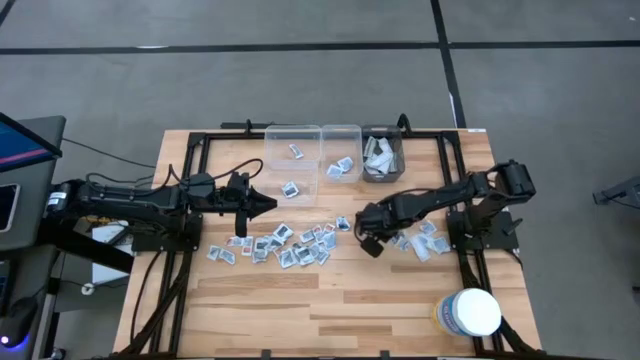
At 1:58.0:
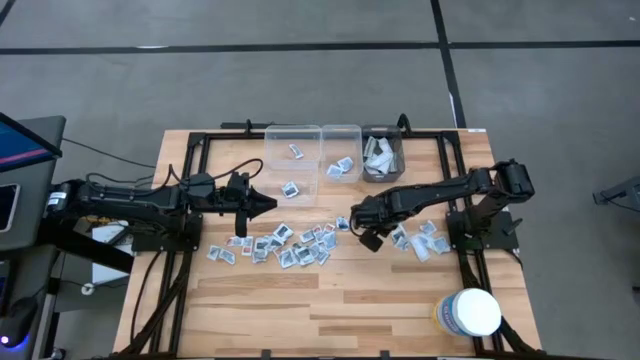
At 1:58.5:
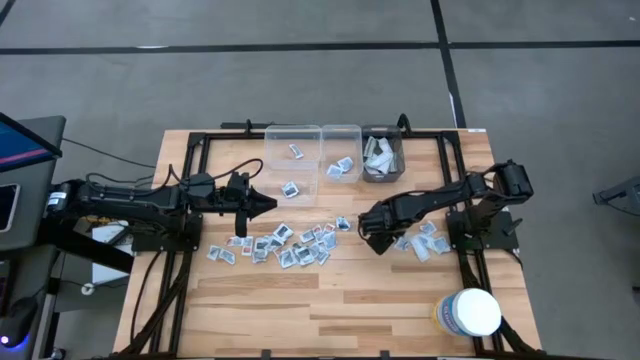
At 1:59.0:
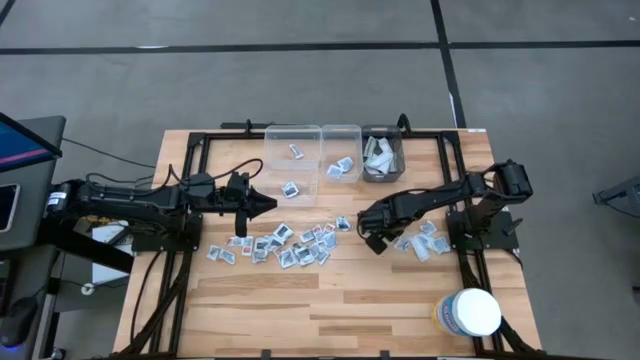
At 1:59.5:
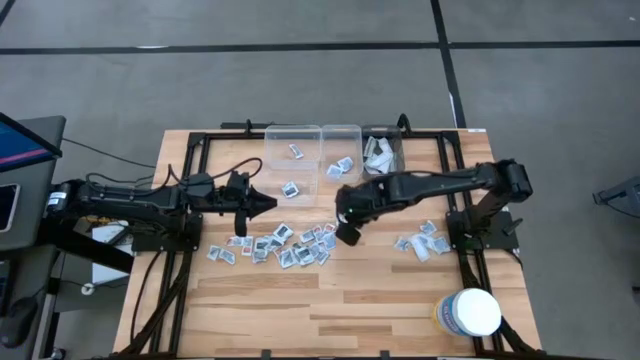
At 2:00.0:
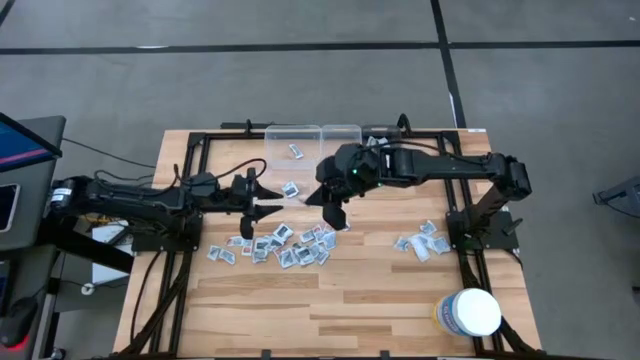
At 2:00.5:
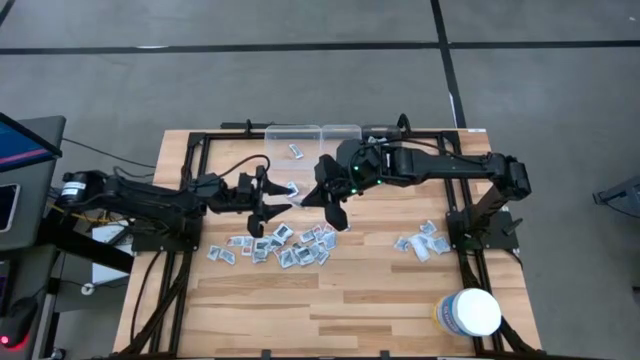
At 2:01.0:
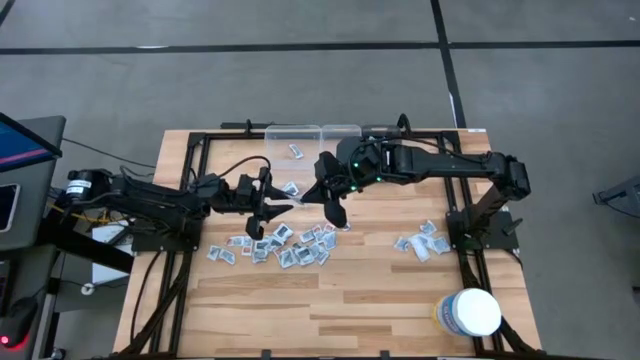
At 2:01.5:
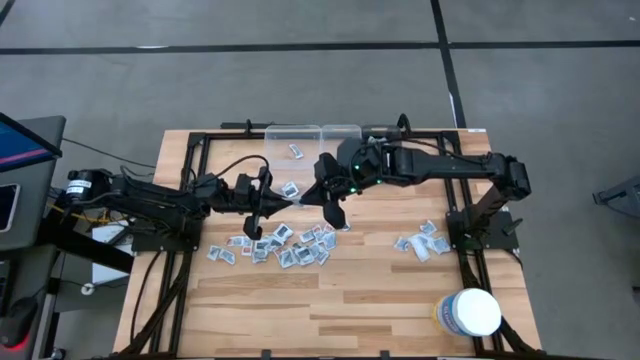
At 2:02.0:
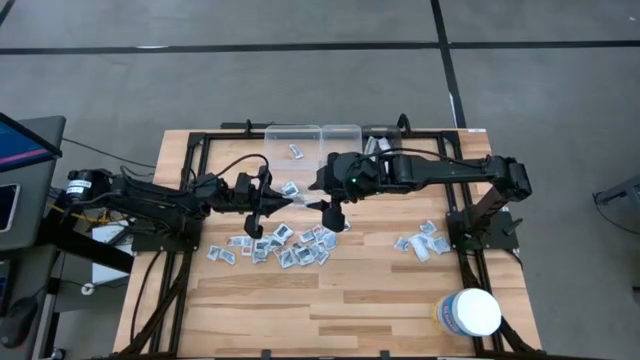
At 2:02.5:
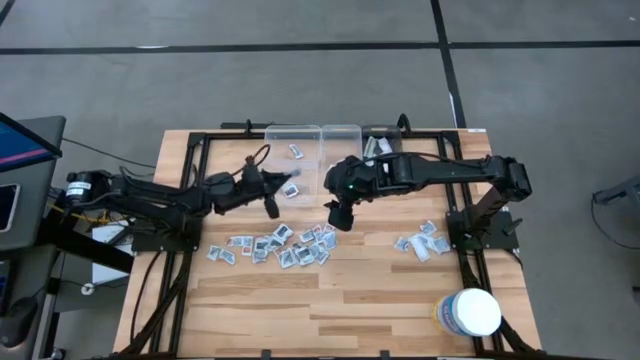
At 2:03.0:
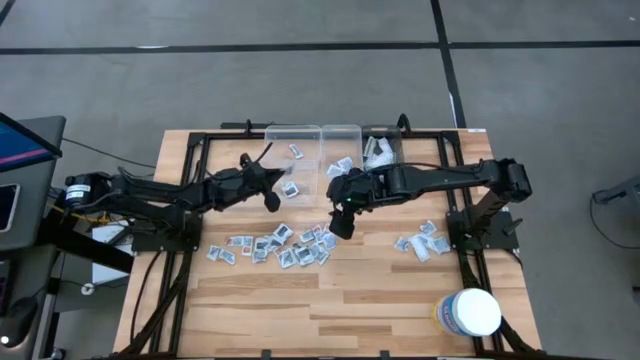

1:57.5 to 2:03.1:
Task: Pick & Place First Aid Supplies
Put the towelette pack into the bottom transparent bin

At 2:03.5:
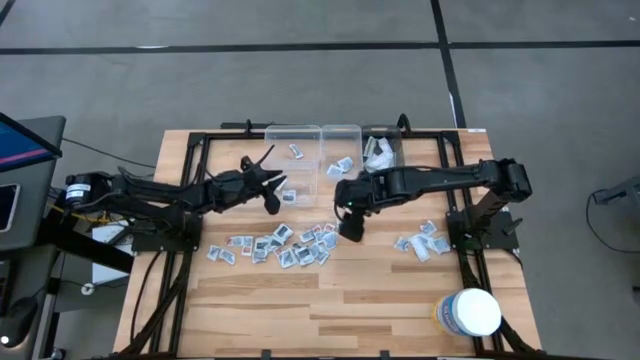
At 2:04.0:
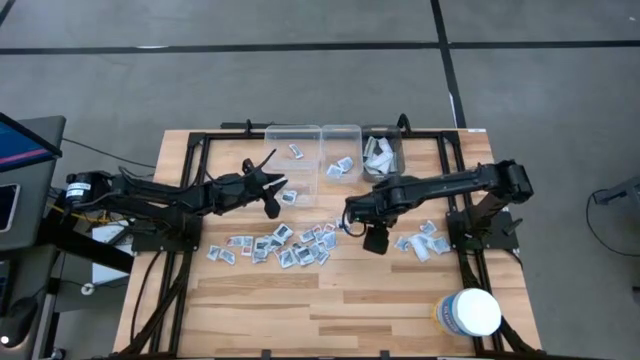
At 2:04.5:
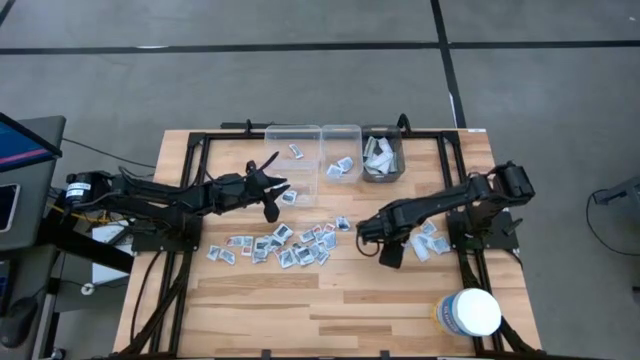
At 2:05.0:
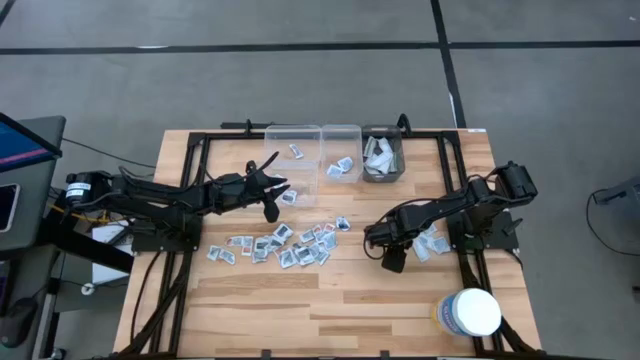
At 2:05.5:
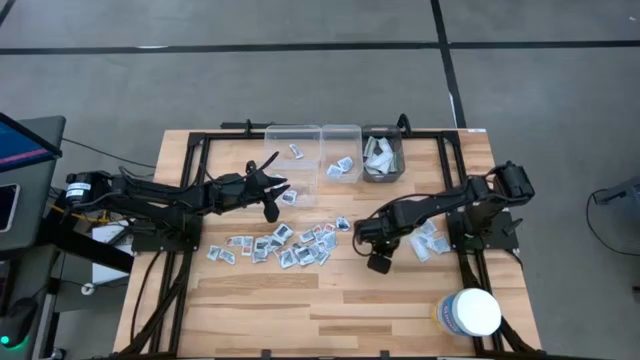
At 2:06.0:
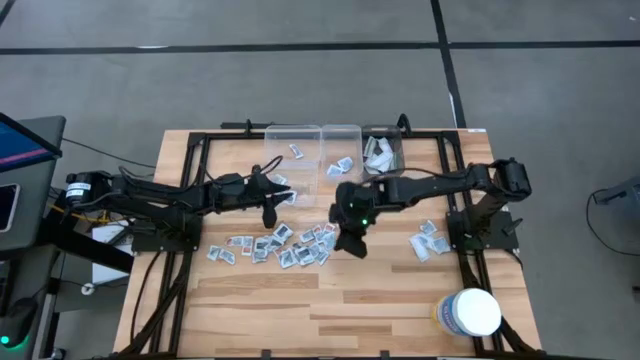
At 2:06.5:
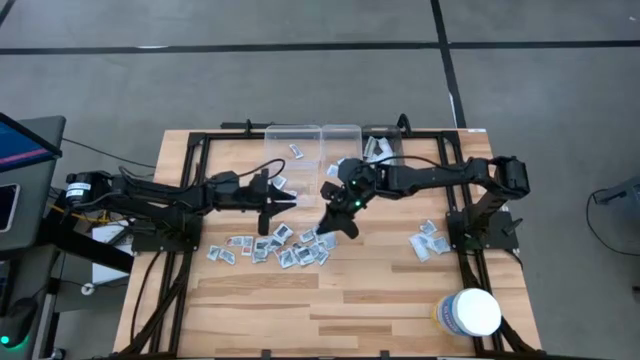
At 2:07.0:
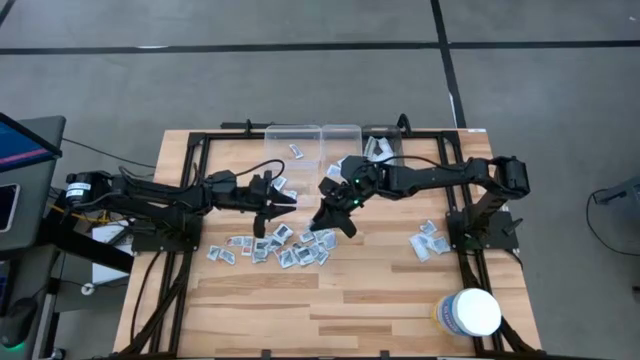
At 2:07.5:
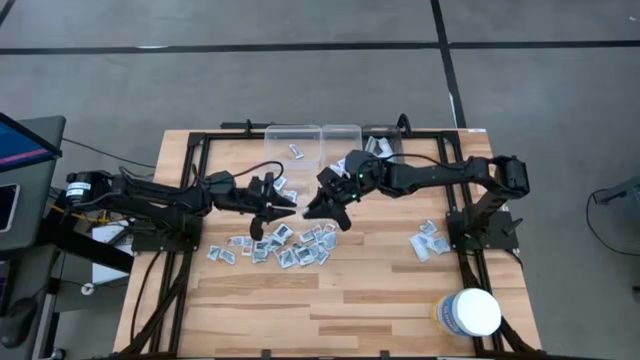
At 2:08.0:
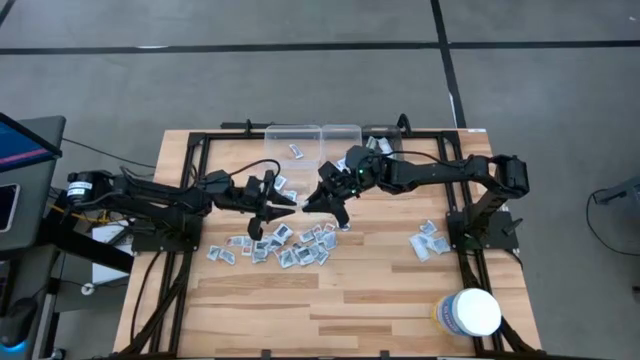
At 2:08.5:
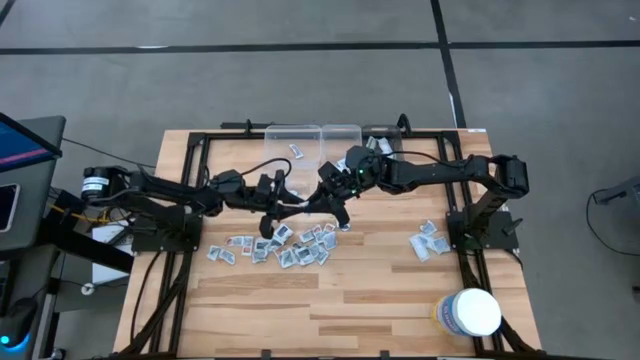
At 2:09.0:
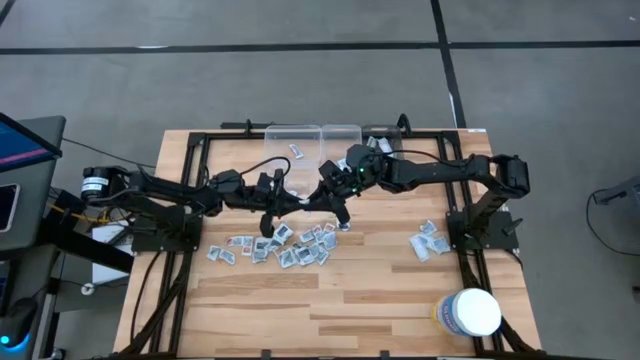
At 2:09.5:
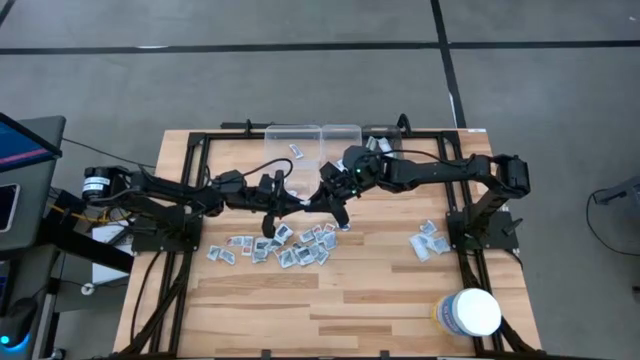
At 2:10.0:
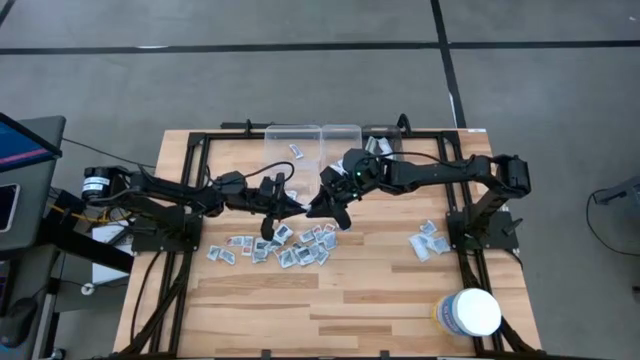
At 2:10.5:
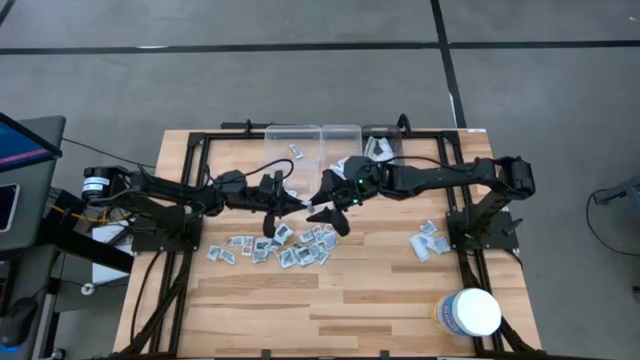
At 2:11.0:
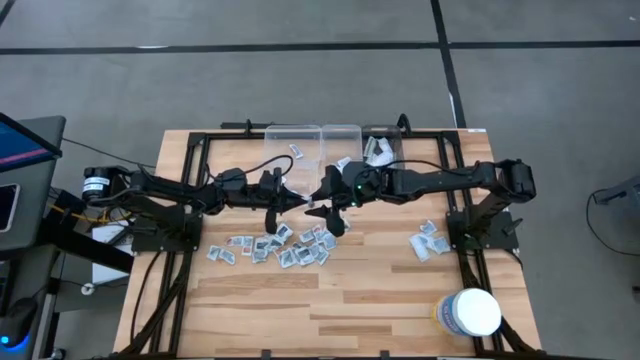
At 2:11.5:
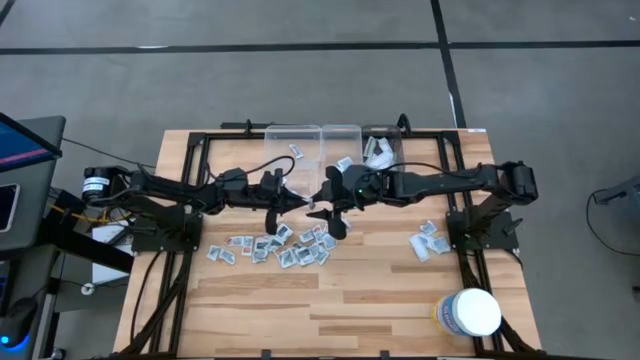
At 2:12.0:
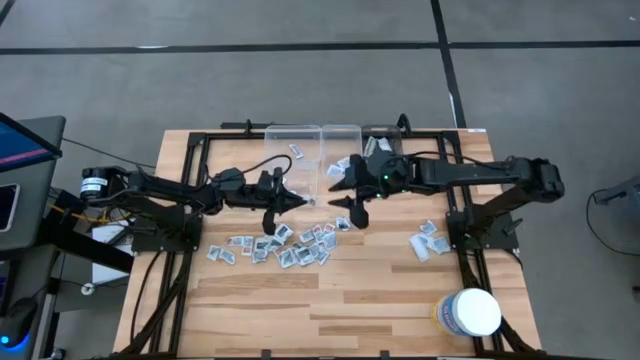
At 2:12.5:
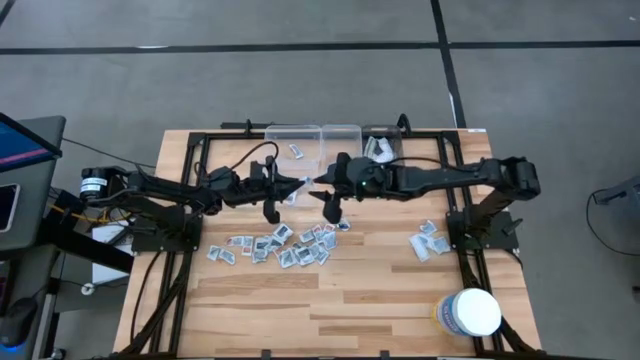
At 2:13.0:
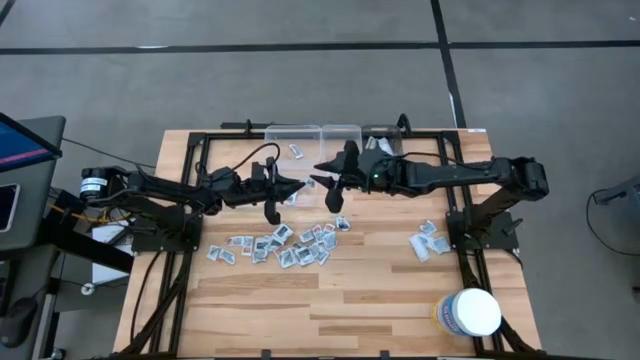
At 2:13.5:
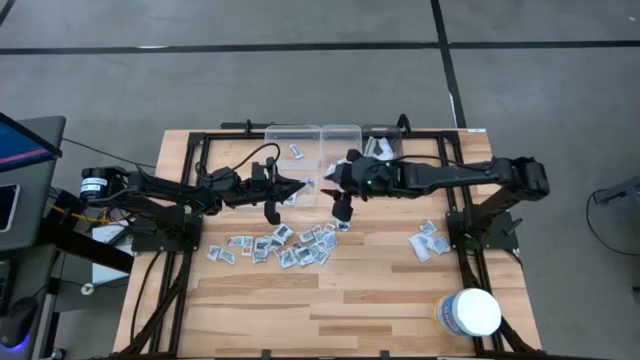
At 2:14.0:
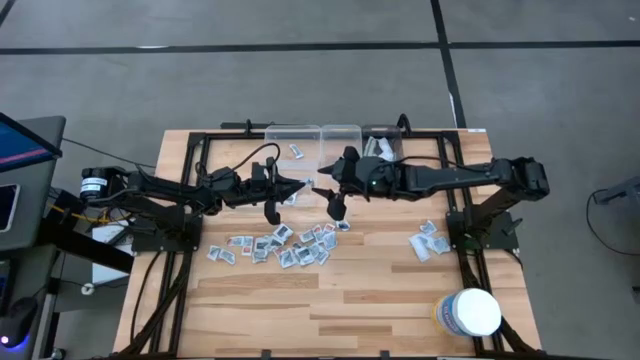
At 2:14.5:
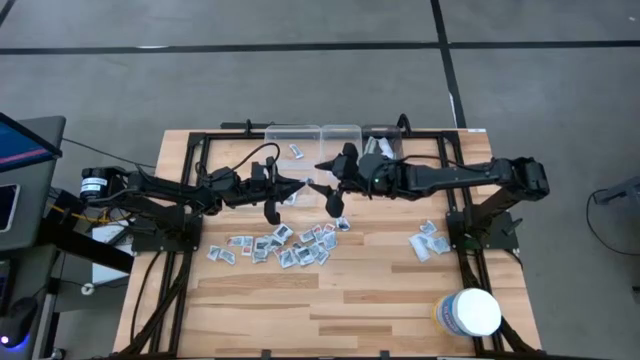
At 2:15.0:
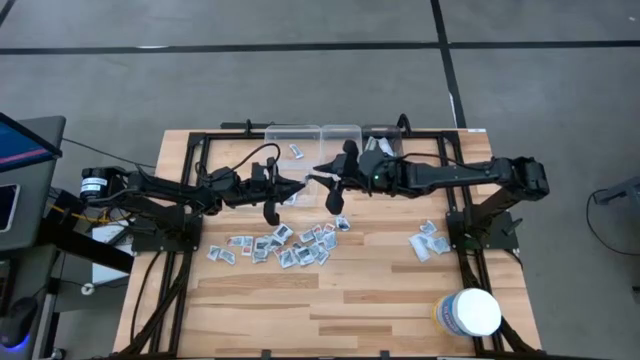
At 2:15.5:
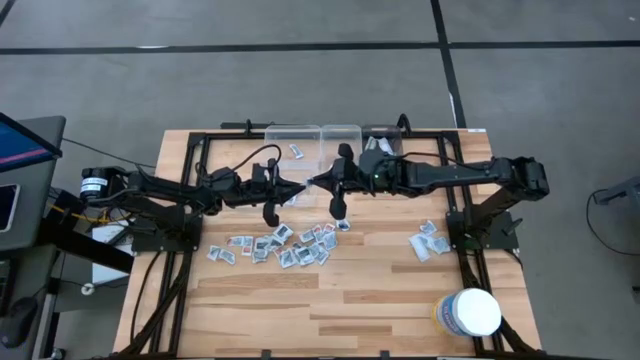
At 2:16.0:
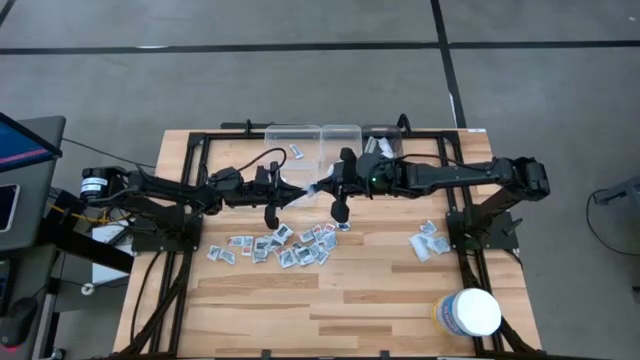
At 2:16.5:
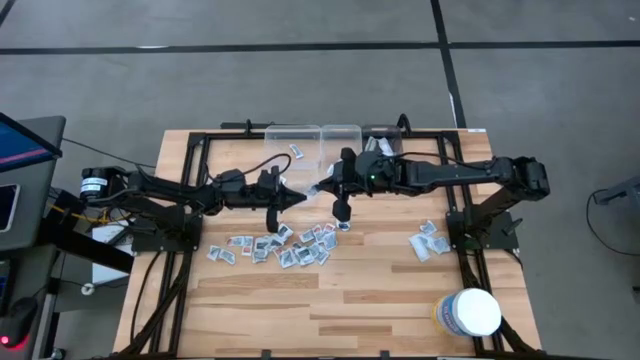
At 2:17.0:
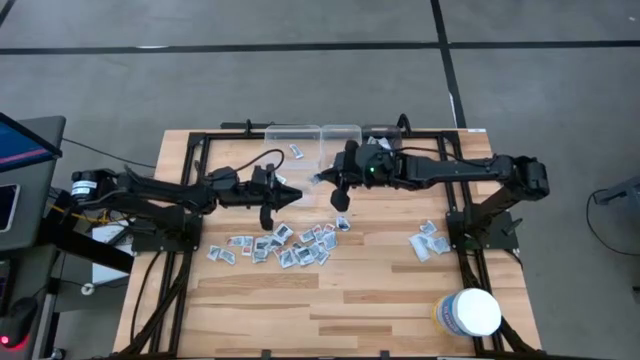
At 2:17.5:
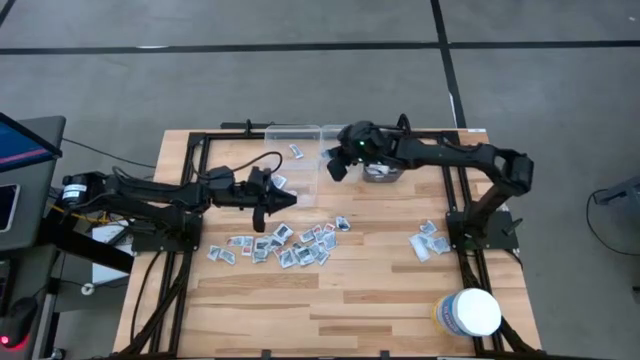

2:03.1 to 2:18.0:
Put the alcohol pad into the top right transparent bin
